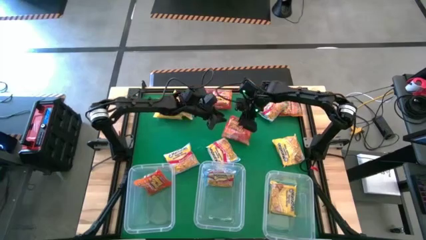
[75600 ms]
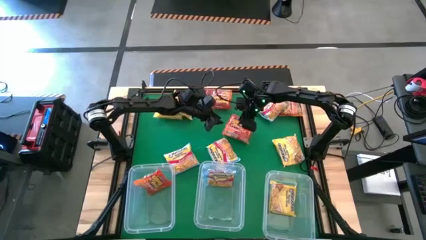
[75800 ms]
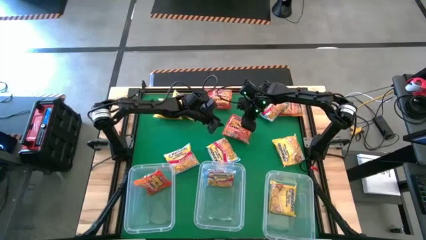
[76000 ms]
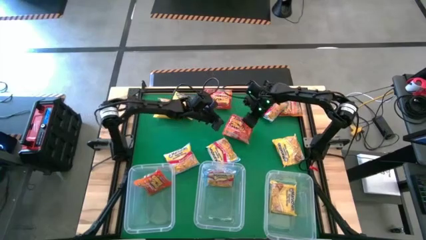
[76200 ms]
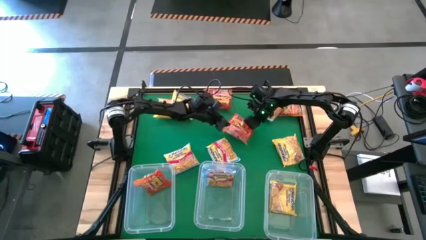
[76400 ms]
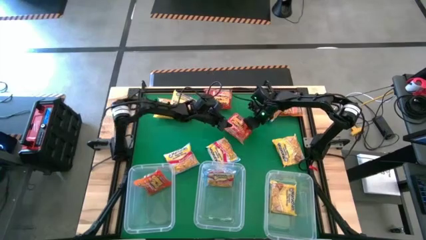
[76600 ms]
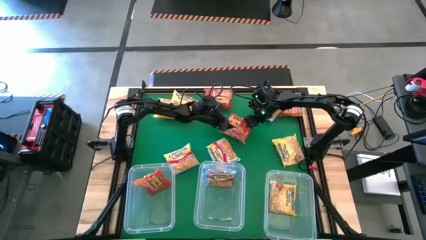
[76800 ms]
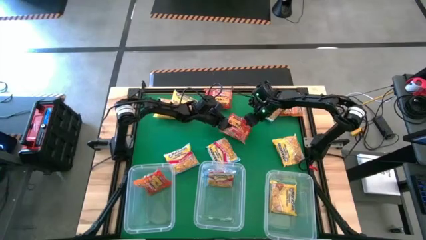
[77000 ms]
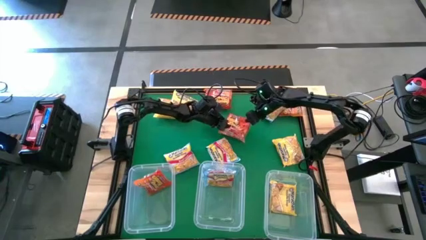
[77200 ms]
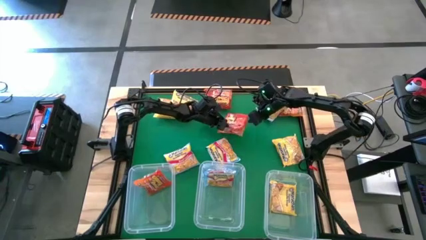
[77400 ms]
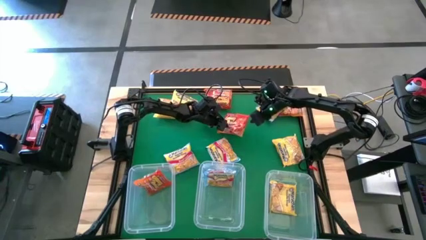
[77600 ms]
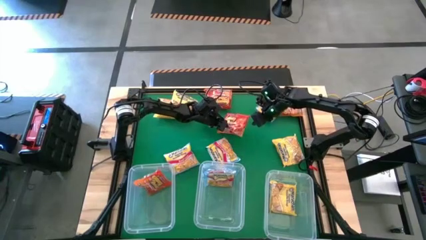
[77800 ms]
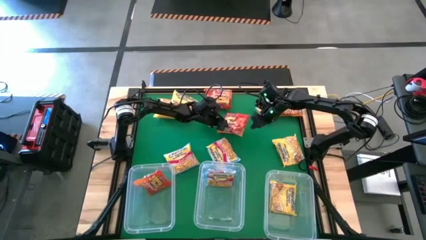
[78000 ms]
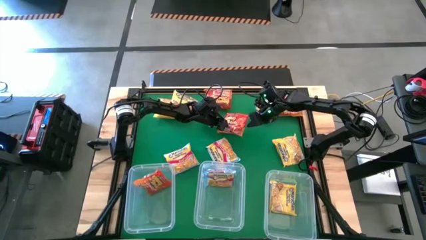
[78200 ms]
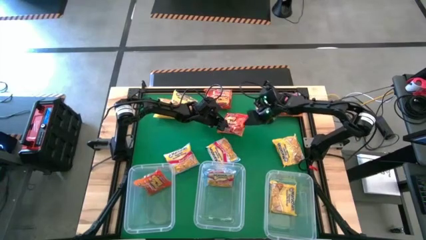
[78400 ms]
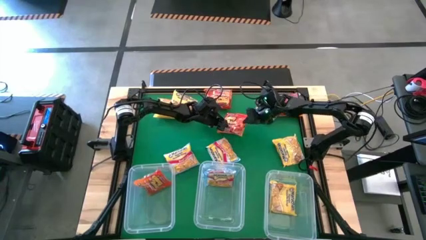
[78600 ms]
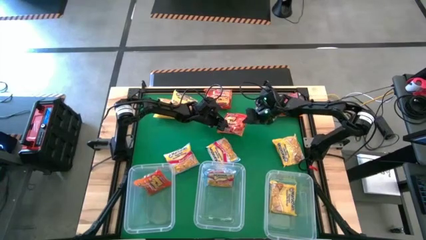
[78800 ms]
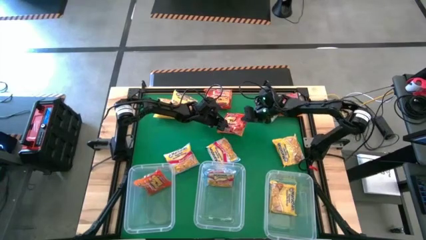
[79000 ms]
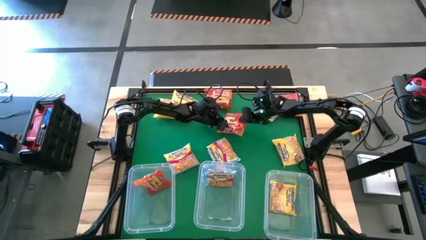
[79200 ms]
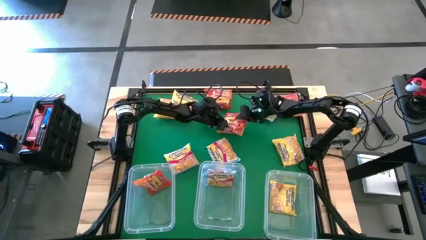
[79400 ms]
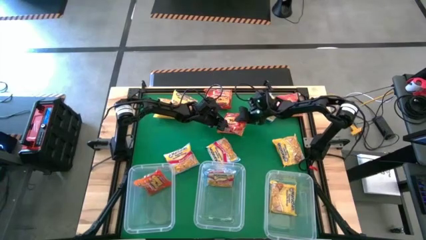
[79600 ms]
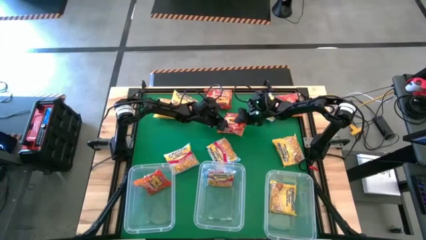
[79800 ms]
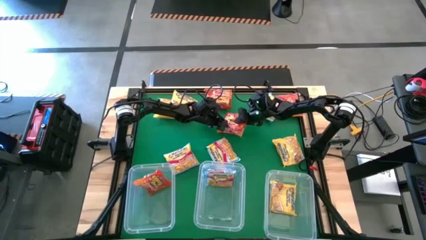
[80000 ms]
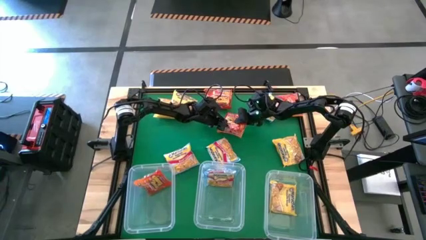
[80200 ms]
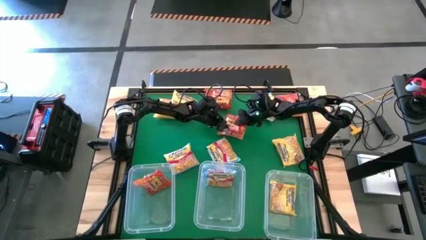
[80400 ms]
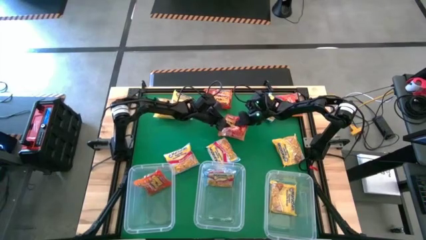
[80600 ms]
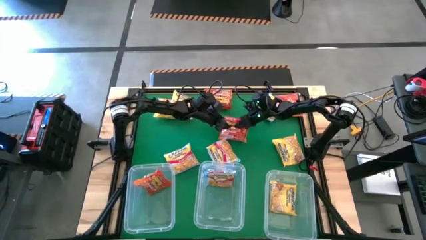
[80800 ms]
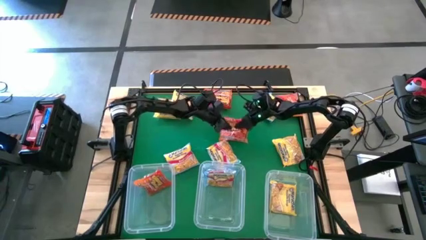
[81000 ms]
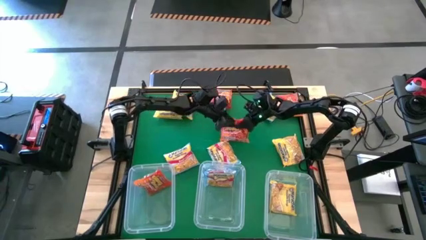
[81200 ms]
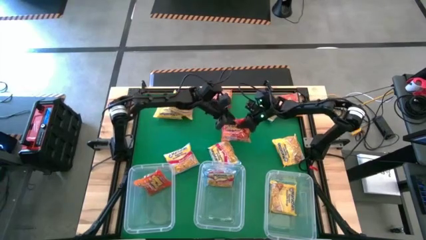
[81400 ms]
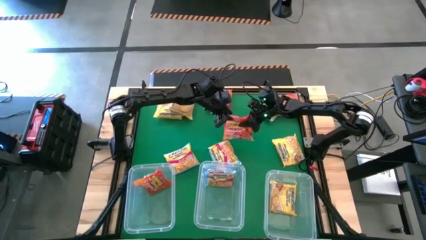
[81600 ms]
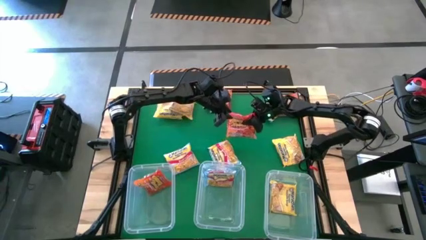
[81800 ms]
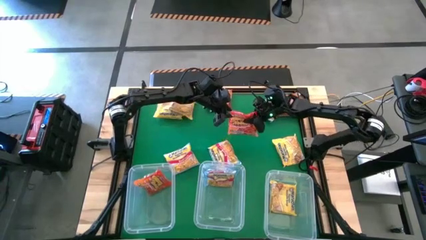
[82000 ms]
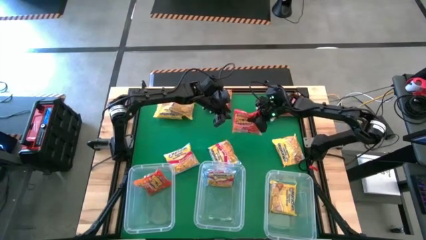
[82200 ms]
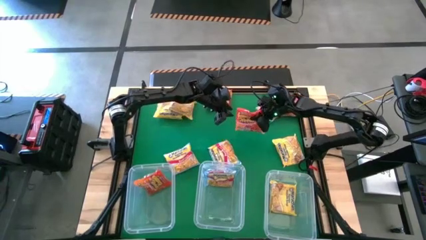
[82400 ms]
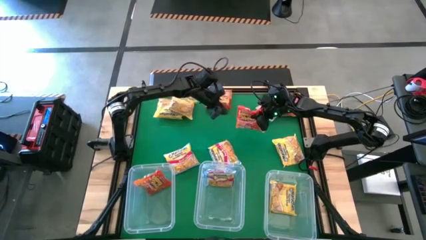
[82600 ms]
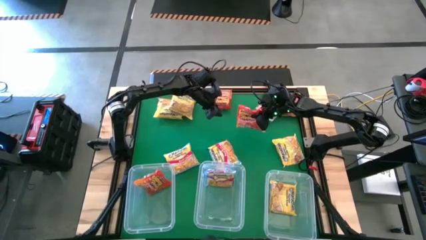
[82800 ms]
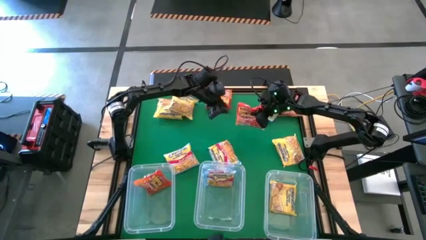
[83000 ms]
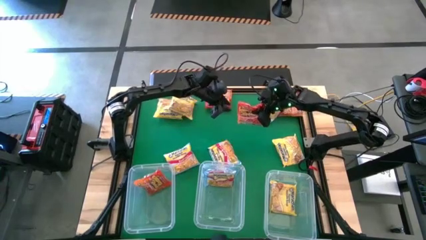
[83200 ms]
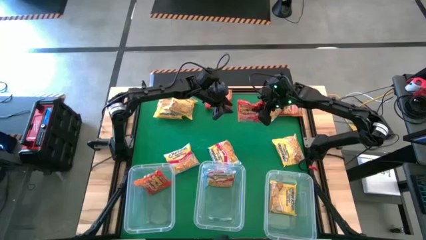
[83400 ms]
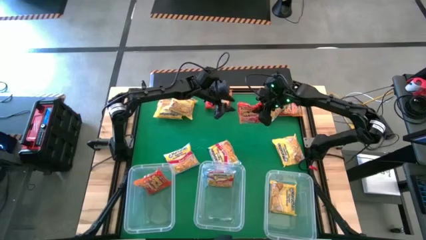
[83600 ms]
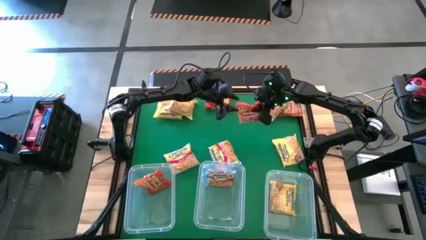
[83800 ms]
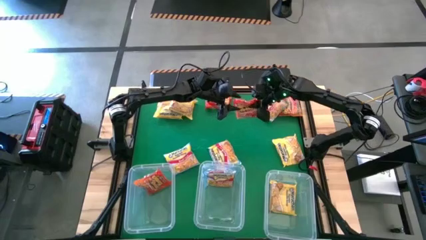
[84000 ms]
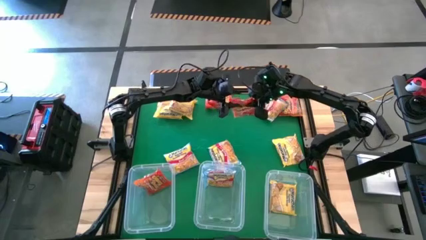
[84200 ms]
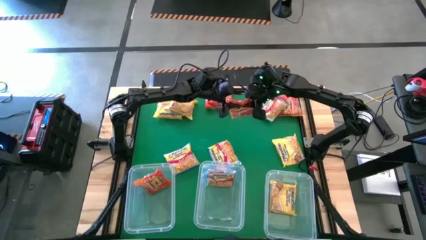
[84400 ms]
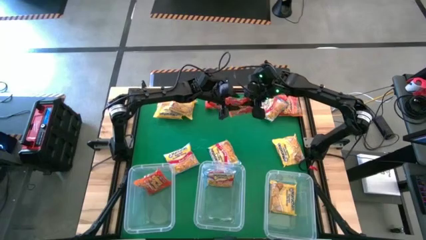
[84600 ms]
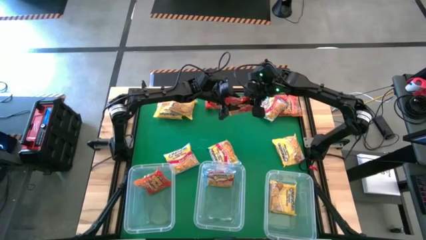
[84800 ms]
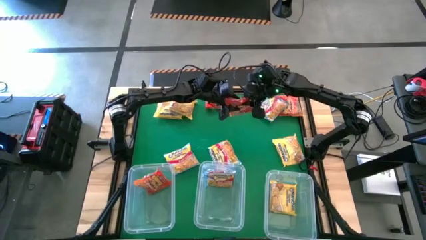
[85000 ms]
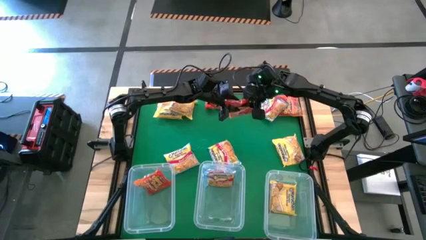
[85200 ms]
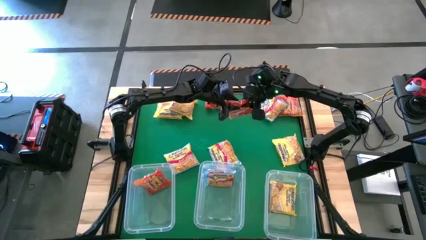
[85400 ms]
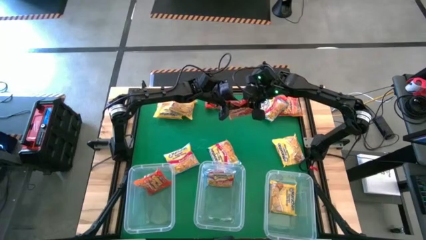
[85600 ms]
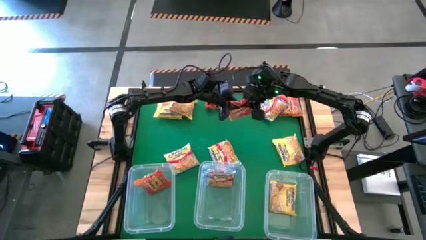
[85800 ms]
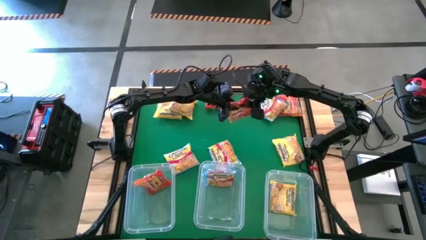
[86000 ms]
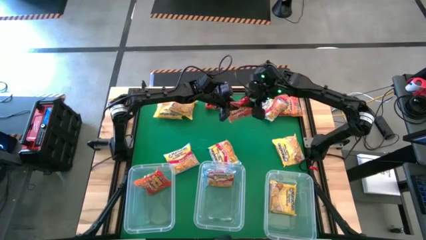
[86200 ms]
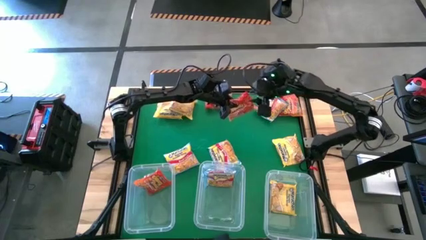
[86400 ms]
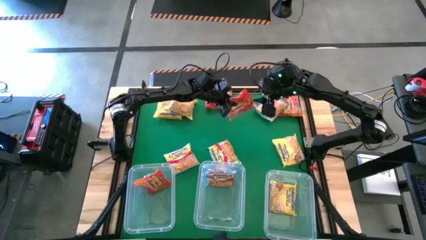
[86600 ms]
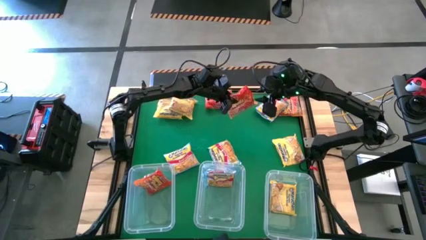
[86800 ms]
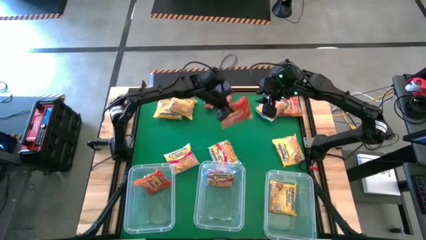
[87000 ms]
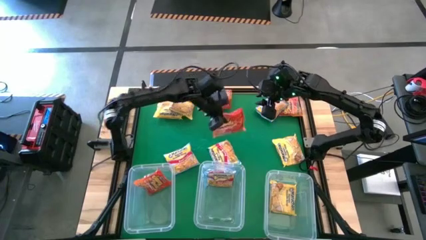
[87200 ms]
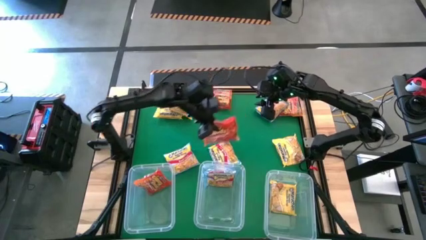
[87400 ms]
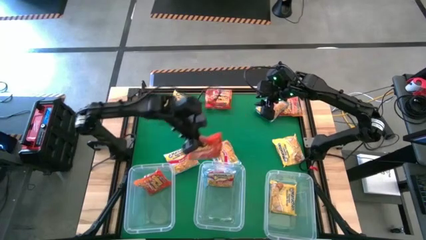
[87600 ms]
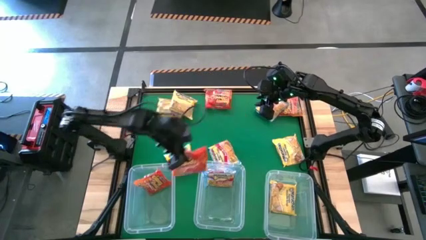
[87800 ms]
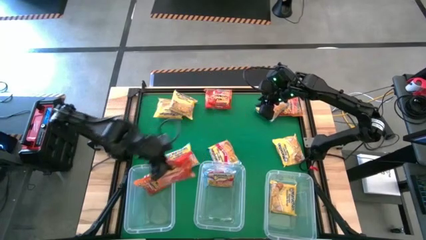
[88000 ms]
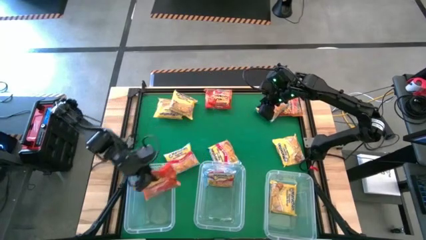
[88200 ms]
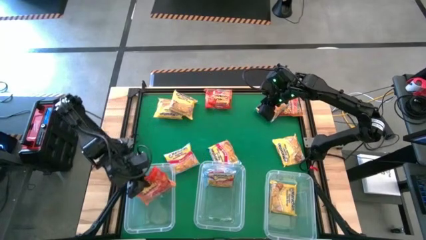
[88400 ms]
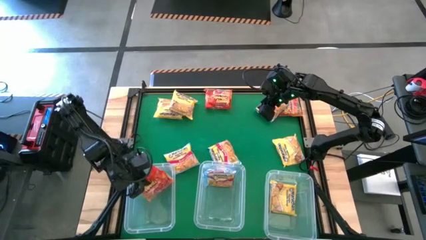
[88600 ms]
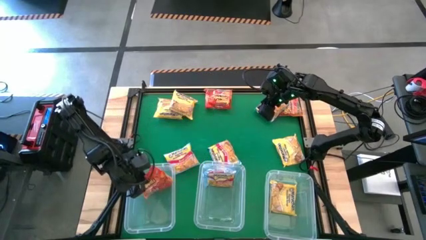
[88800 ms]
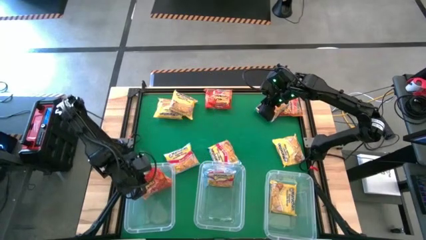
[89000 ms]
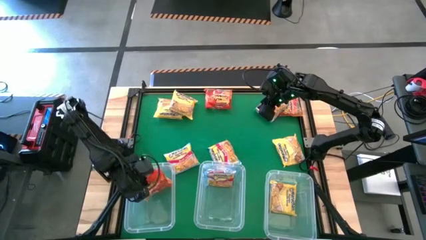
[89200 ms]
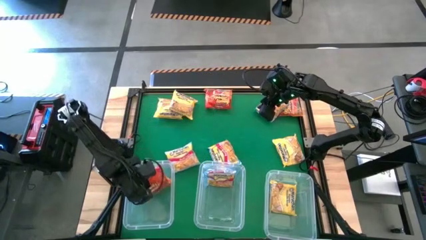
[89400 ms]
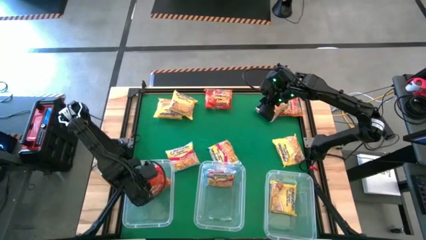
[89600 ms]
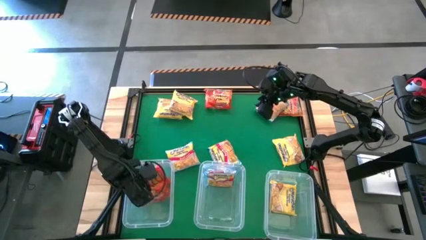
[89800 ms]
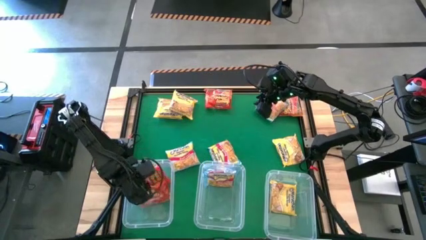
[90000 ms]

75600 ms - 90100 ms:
Task: Sort Maruchan noodles
Put the orange noodle pack into the left transparent bin
